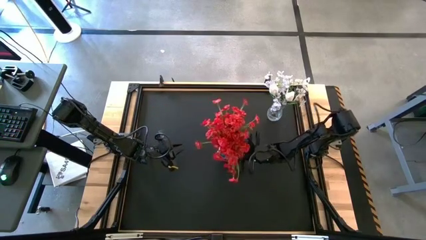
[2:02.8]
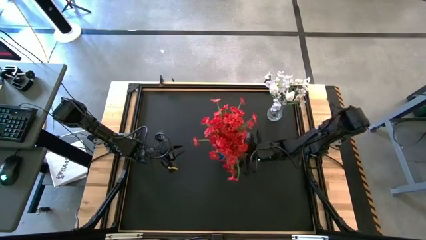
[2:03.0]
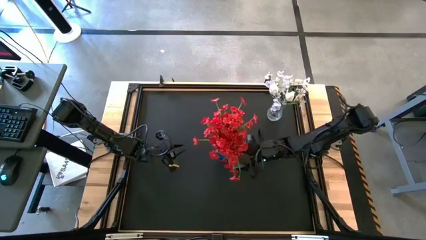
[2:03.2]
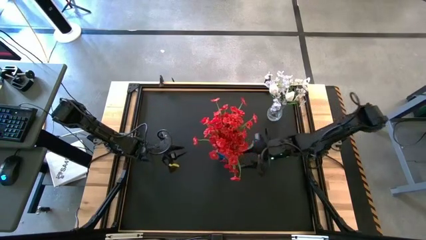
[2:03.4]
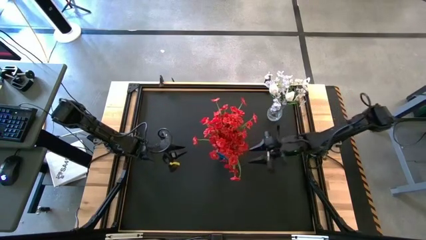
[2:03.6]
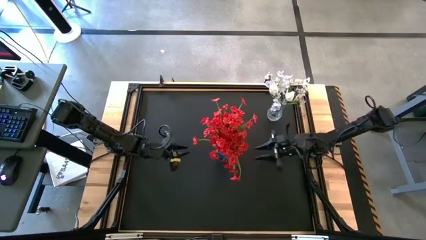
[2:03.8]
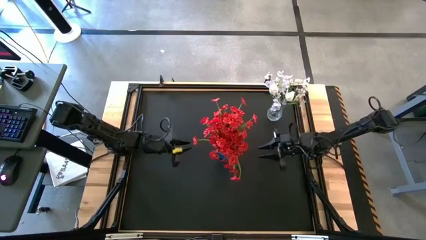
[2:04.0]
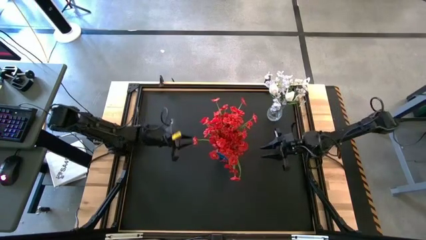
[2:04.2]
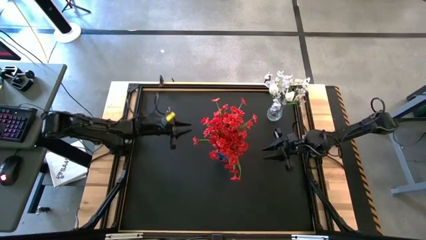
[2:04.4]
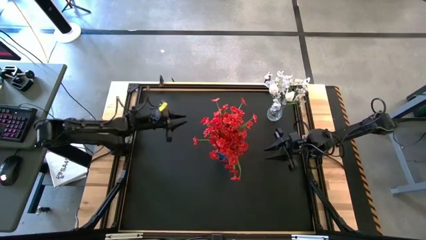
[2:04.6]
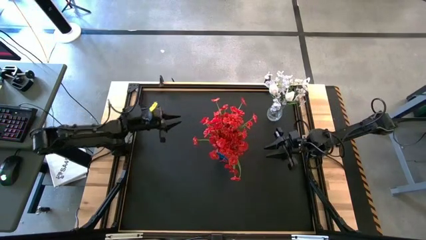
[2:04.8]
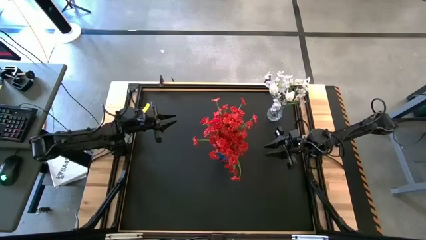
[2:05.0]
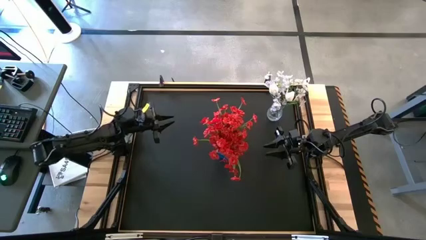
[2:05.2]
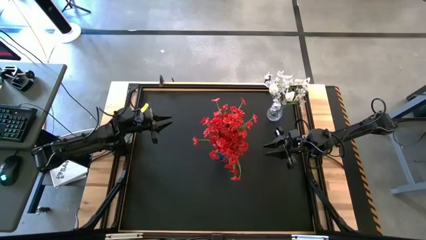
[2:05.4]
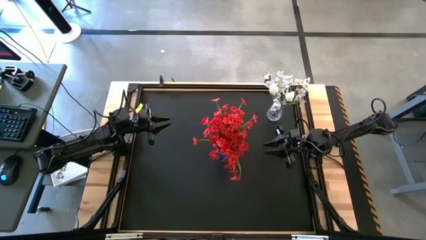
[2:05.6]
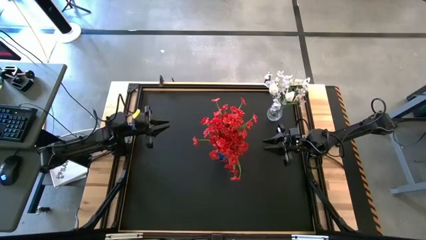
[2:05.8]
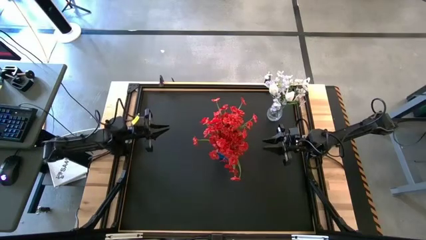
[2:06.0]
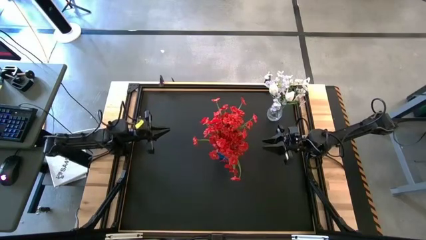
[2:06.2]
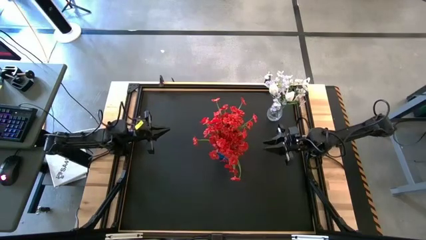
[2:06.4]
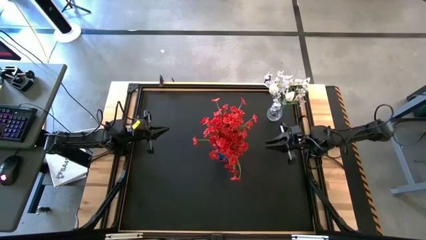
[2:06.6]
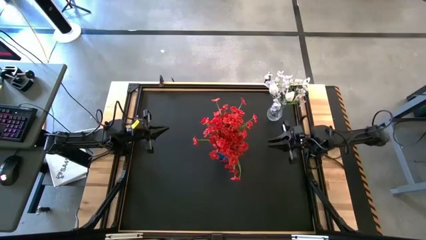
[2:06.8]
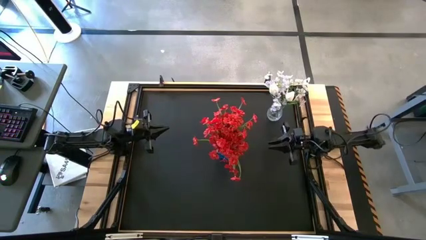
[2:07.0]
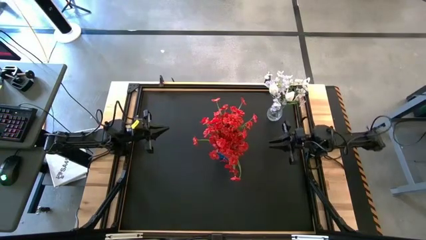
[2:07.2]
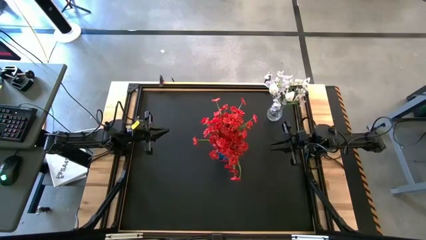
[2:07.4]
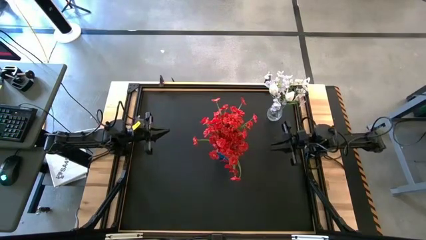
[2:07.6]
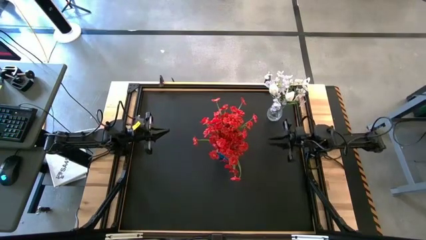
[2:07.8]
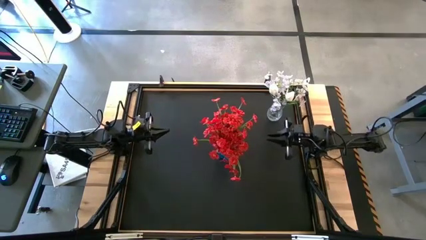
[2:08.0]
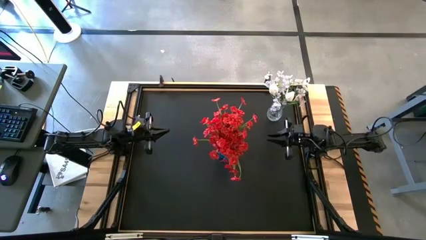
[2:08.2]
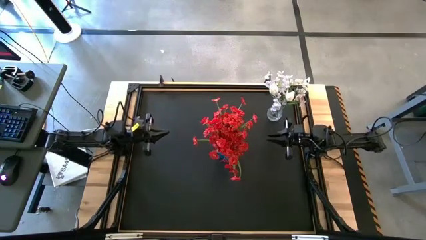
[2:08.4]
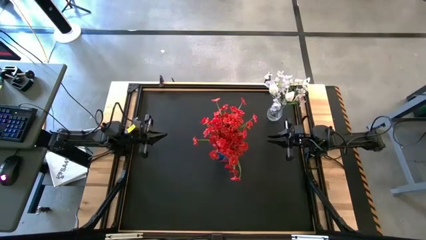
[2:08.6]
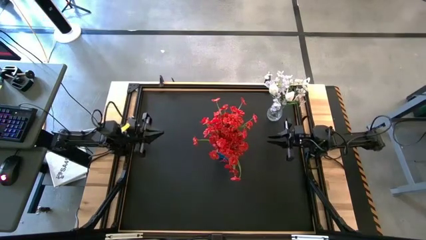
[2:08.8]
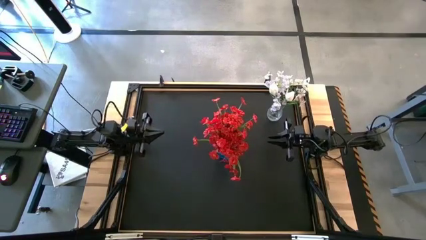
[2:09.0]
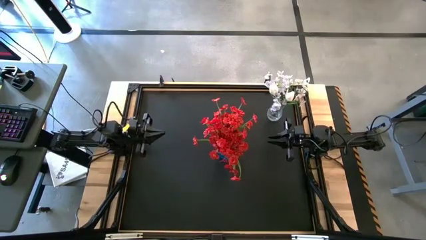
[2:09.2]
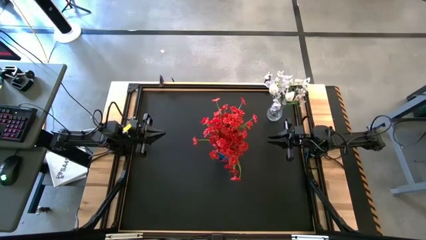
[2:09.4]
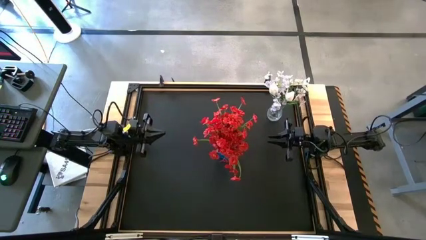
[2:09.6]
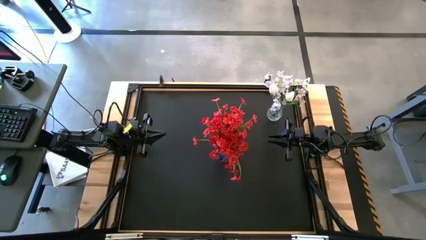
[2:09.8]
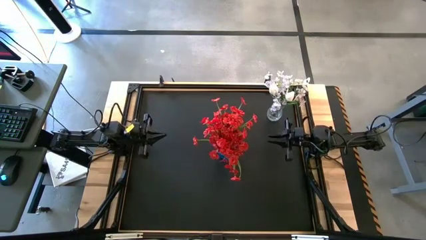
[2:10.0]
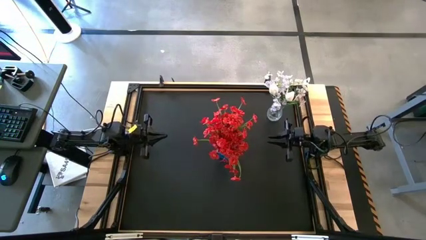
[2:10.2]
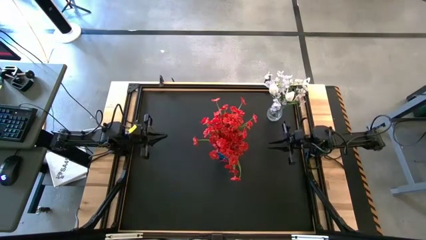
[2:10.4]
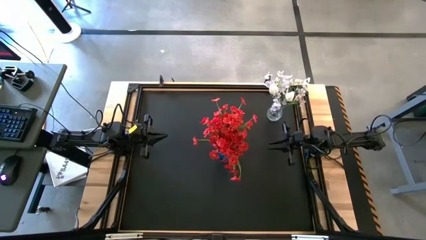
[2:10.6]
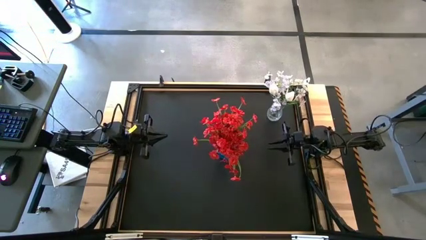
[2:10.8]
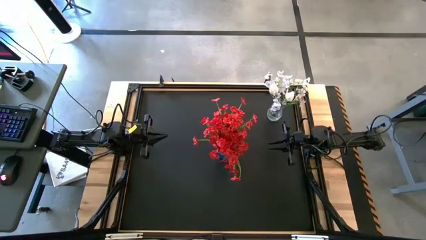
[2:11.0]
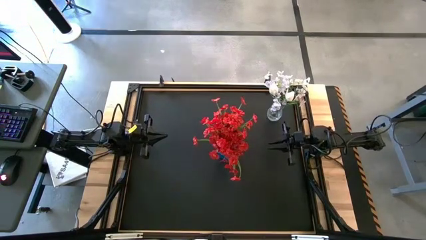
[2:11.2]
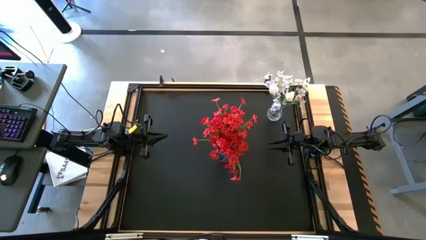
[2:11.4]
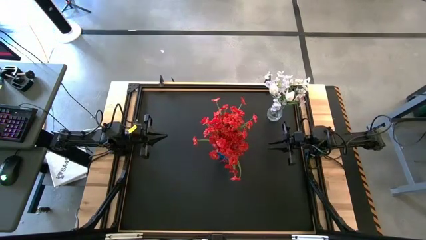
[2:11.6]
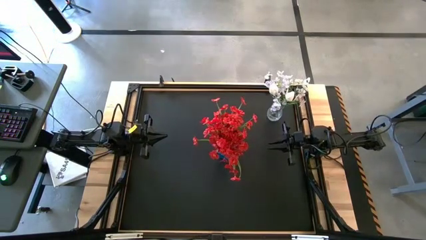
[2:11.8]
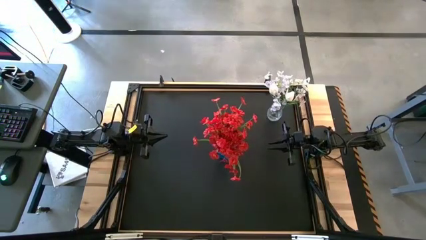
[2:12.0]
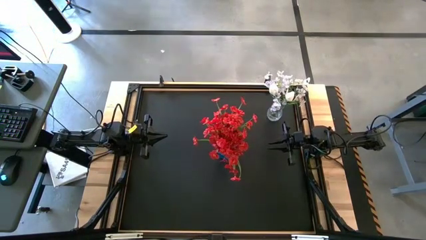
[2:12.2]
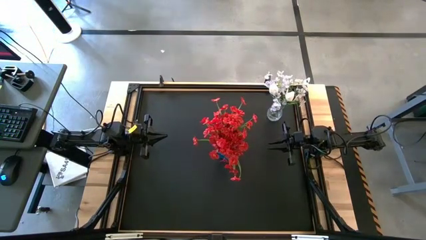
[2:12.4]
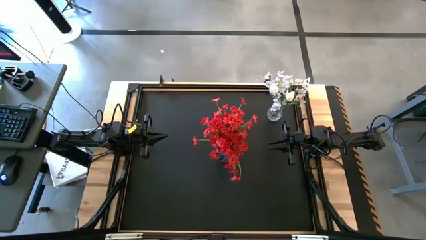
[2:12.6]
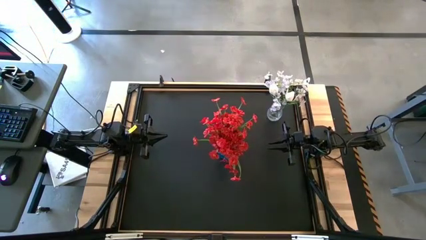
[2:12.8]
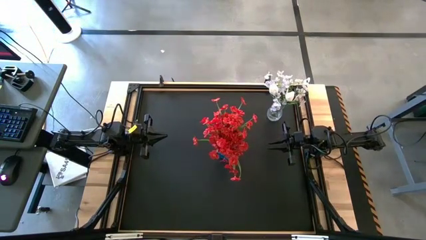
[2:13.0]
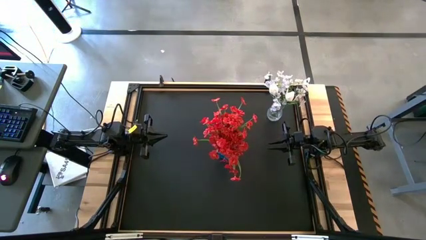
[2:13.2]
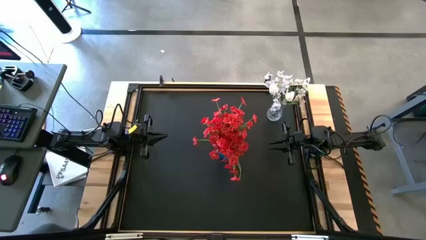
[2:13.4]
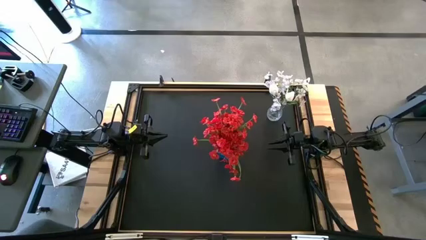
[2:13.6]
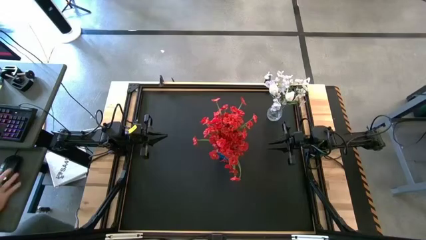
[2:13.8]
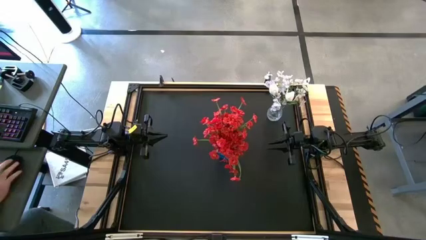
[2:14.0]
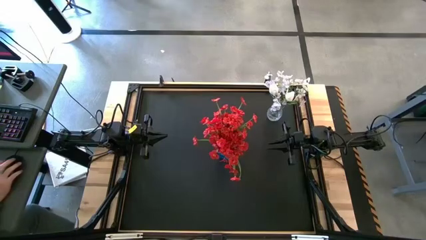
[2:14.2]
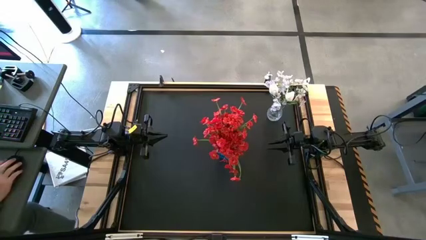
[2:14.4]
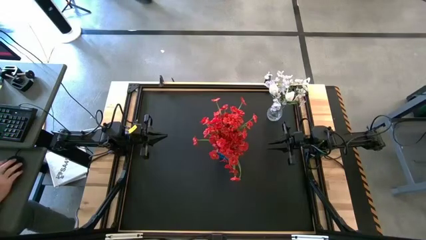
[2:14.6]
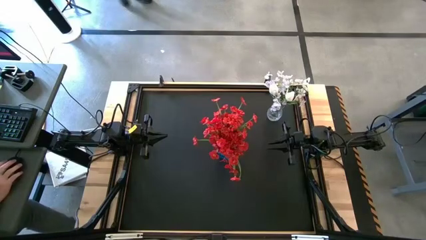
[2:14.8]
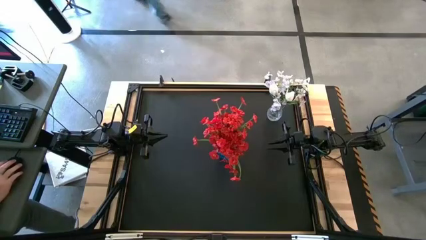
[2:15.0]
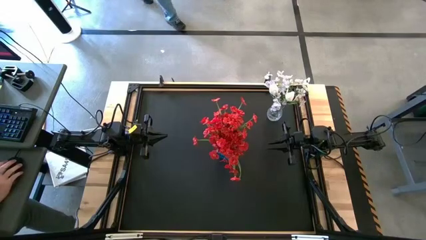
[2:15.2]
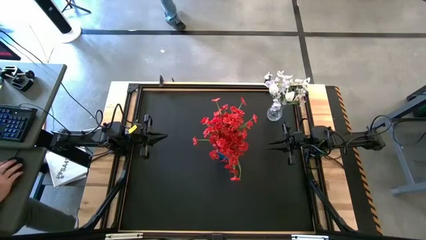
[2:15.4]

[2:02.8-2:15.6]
Task: Sort flowers into vase by color
Return to Home Position

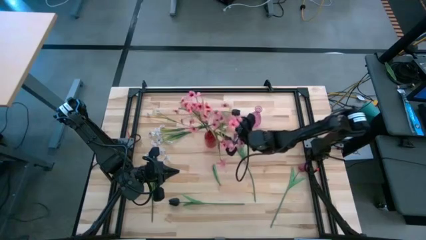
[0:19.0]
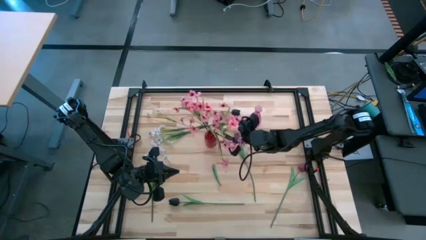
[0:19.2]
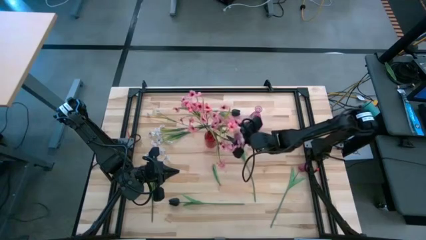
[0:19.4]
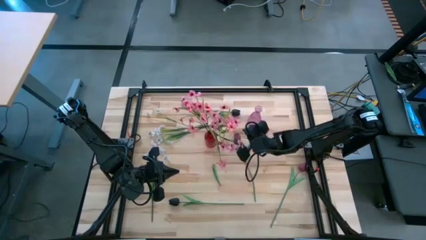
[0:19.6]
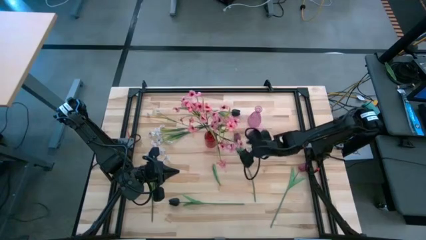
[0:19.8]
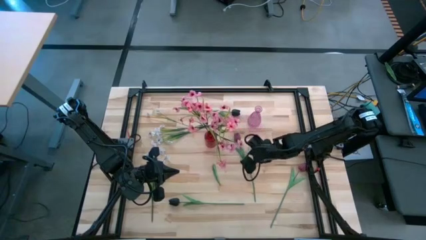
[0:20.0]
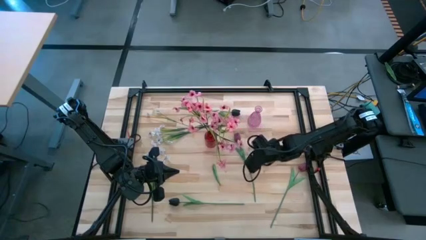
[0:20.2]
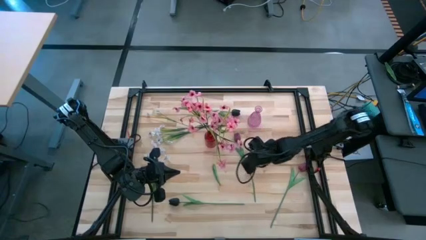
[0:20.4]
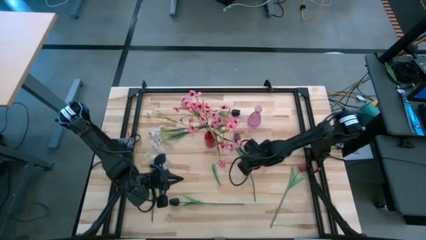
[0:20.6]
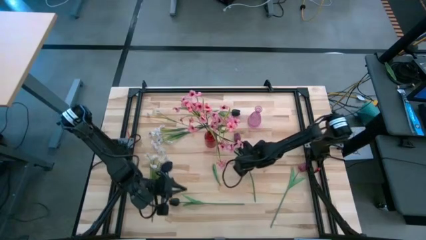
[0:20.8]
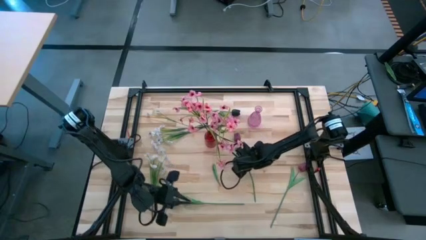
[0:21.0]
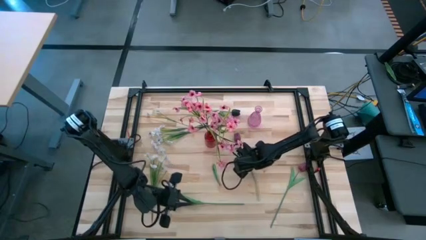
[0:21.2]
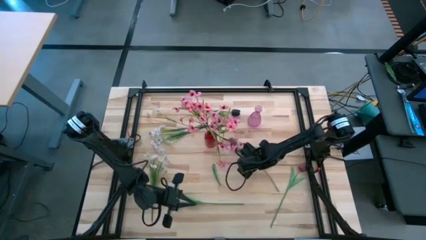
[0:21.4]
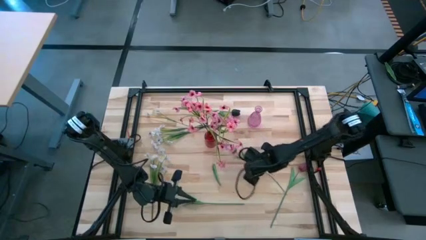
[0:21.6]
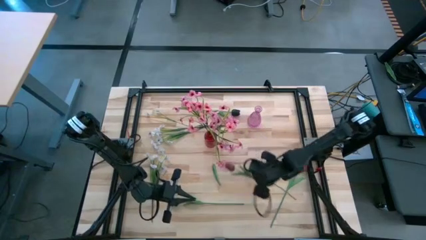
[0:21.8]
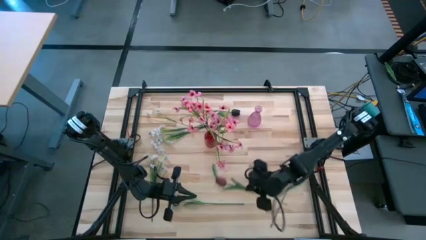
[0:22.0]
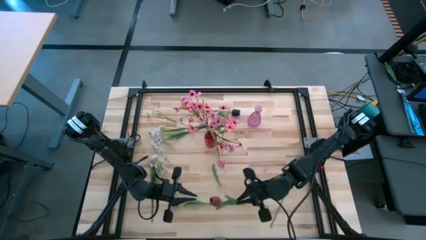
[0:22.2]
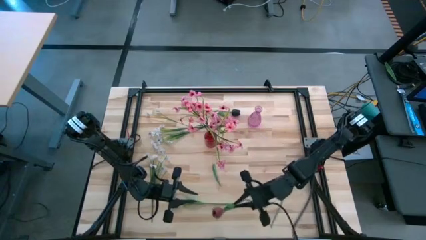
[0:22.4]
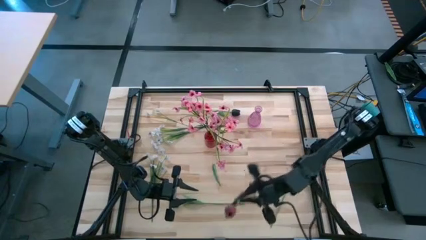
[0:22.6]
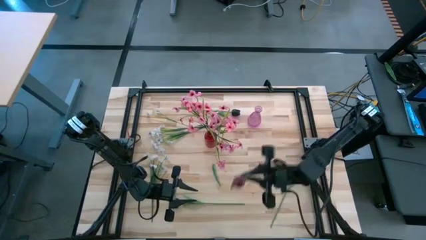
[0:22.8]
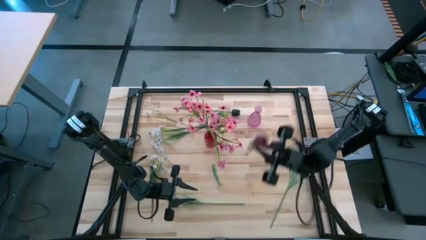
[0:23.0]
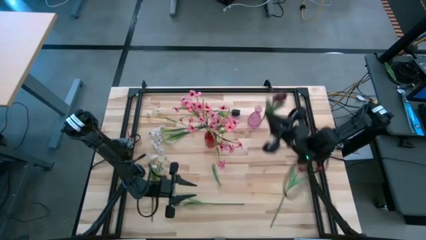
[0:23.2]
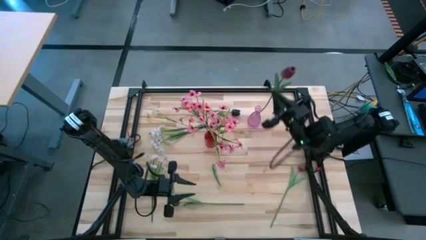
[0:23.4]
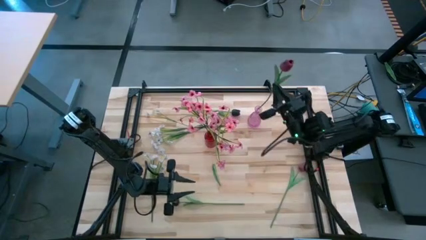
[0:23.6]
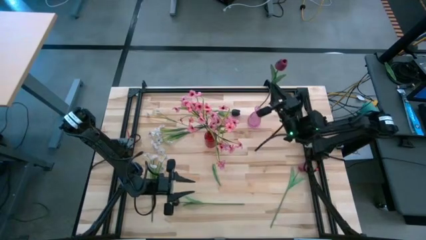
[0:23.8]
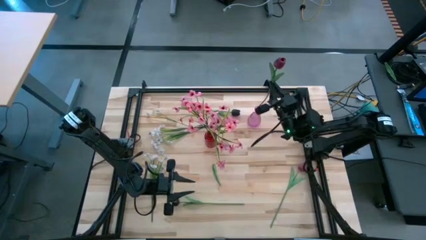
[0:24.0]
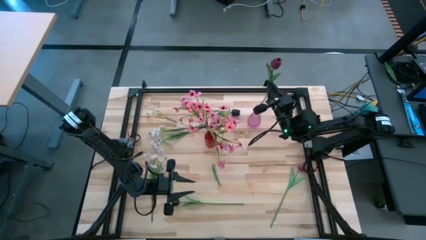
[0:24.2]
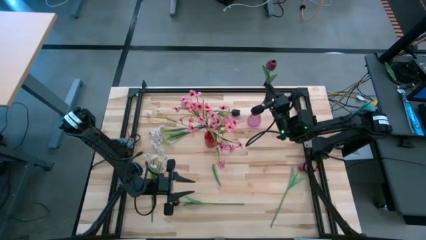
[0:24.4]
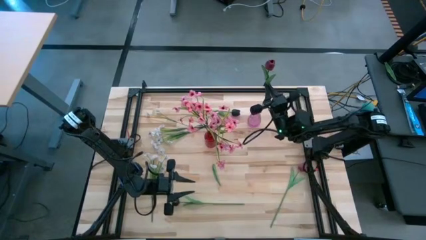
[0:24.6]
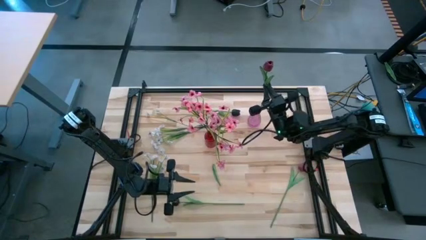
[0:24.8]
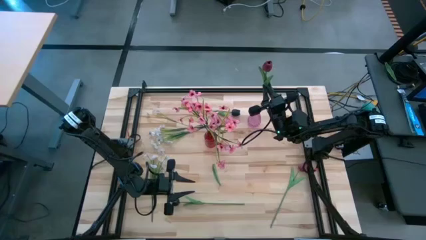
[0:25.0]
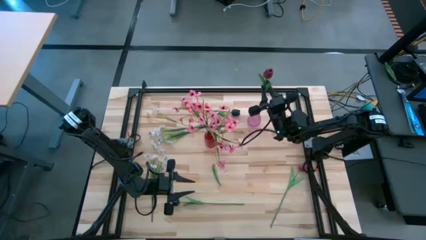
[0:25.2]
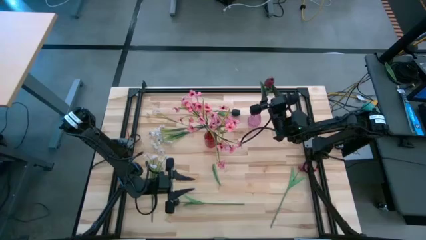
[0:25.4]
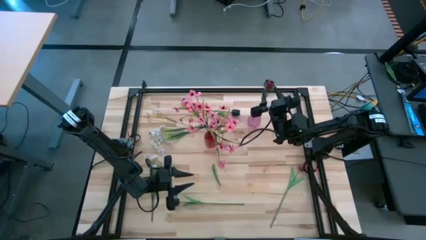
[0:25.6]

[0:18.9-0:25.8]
Task: Sort flowers into vase by color
Put the left red tulip into the violet vase
